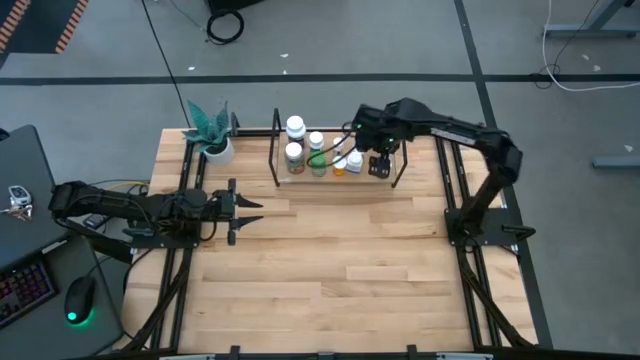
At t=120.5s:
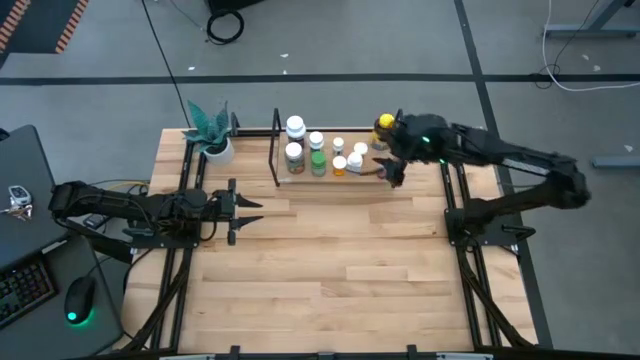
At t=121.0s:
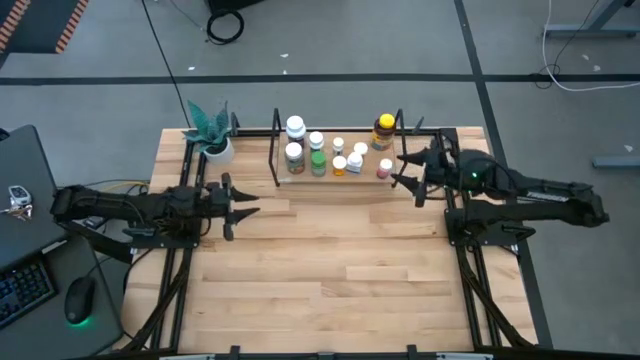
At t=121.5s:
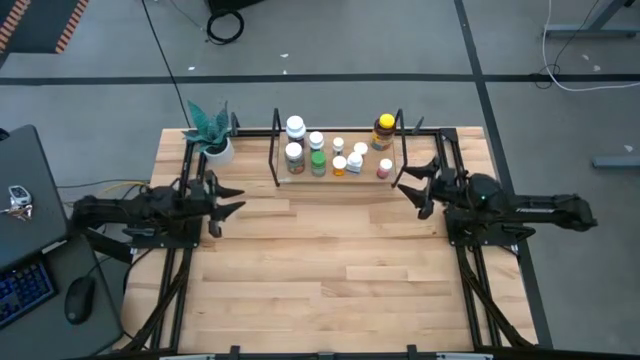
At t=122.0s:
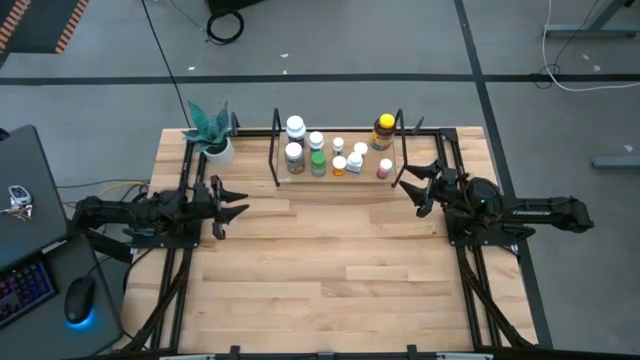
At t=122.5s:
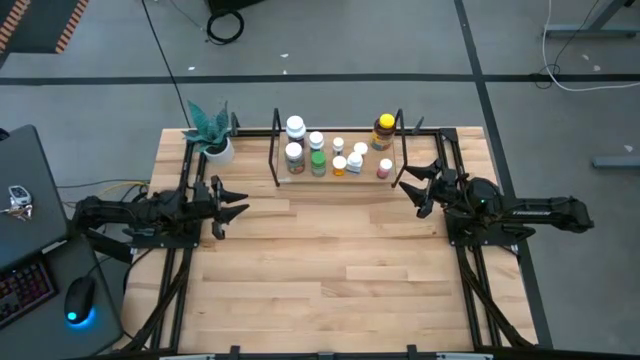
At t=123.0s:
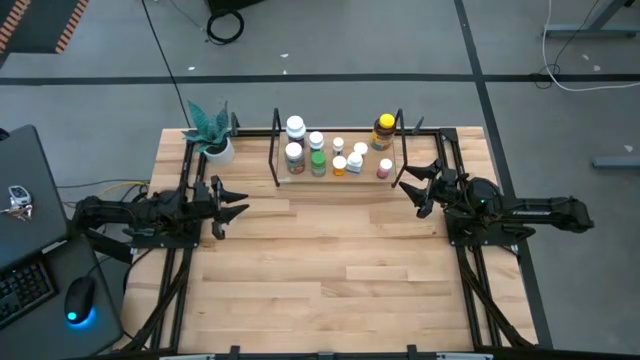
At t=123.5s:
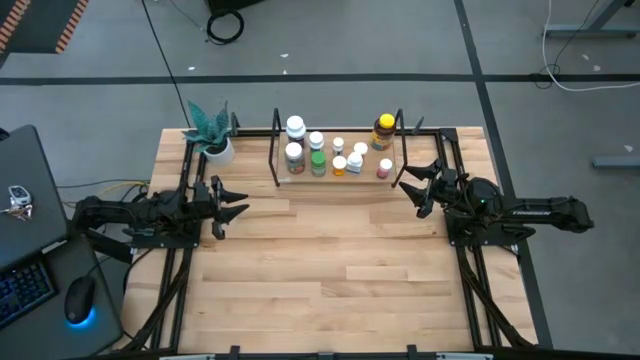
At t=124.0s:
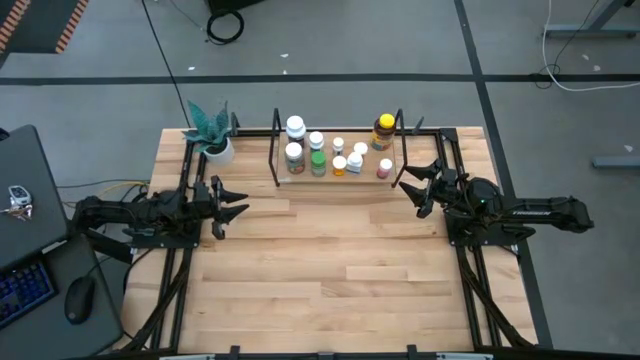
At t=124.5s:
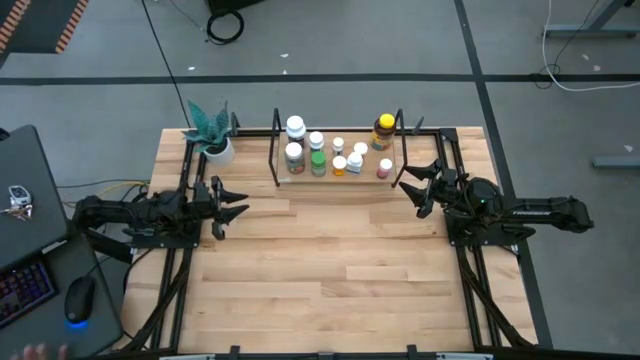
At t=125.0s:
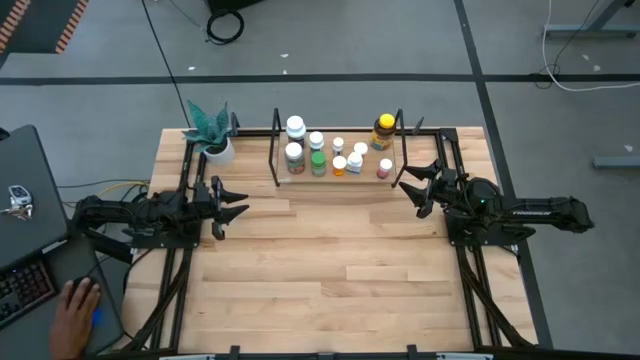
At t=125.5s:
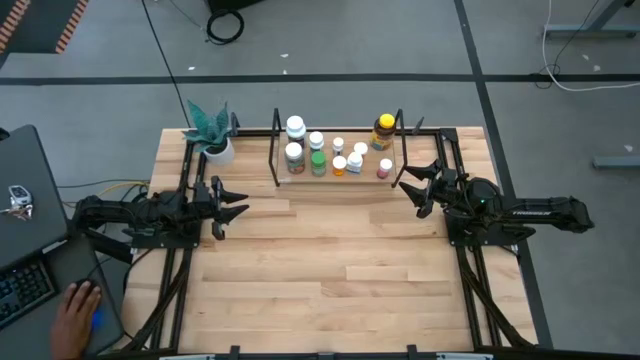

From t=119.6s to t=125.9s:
Task: Pick and place medicine bottles onto shelf by color
Return to Home Position

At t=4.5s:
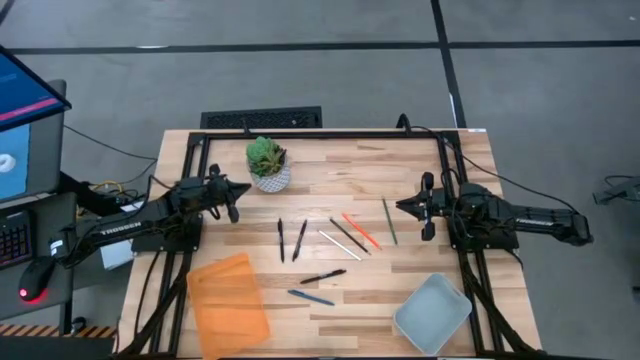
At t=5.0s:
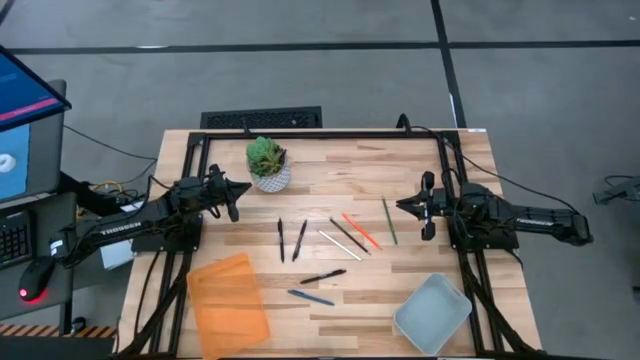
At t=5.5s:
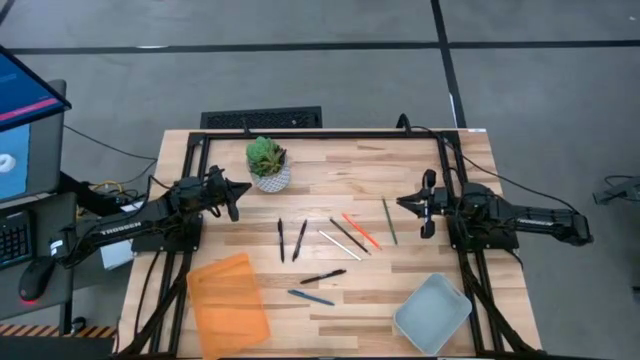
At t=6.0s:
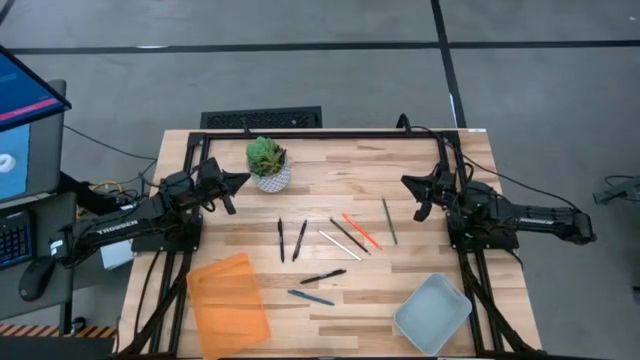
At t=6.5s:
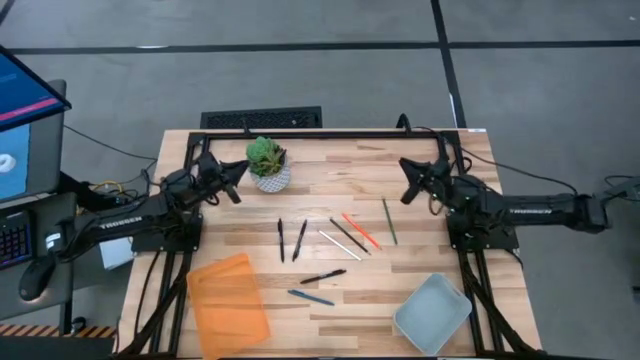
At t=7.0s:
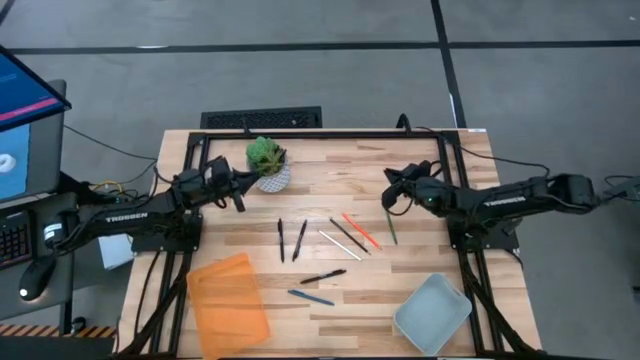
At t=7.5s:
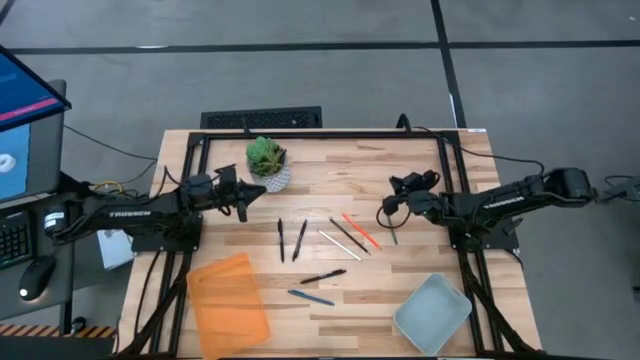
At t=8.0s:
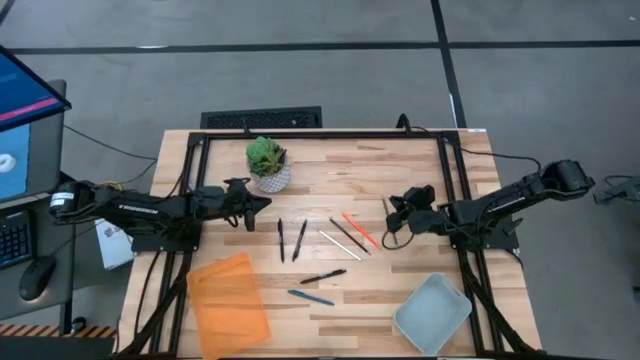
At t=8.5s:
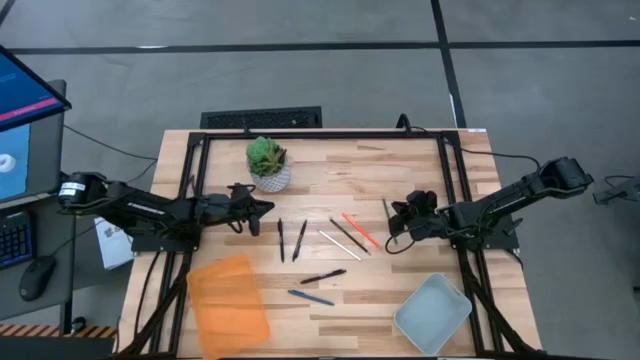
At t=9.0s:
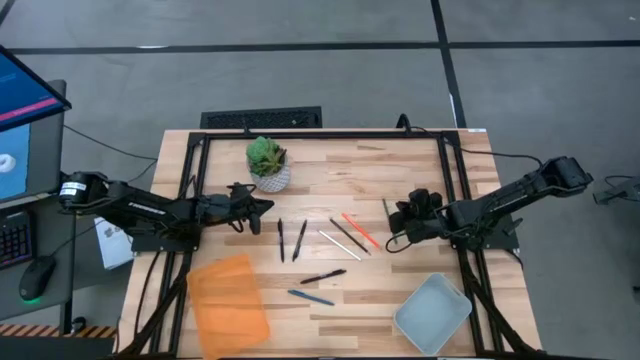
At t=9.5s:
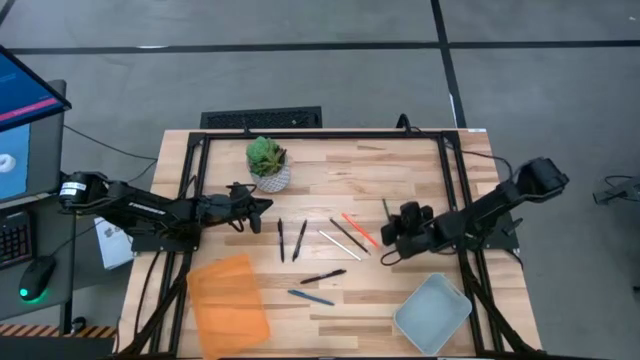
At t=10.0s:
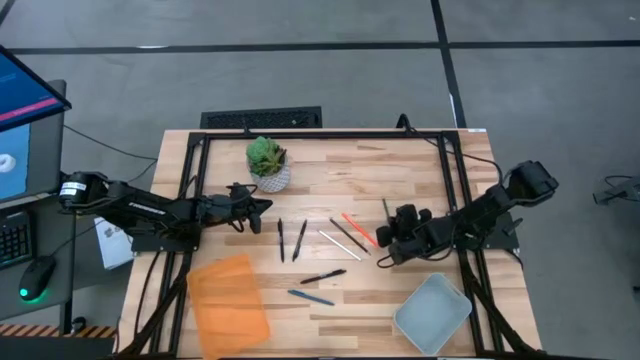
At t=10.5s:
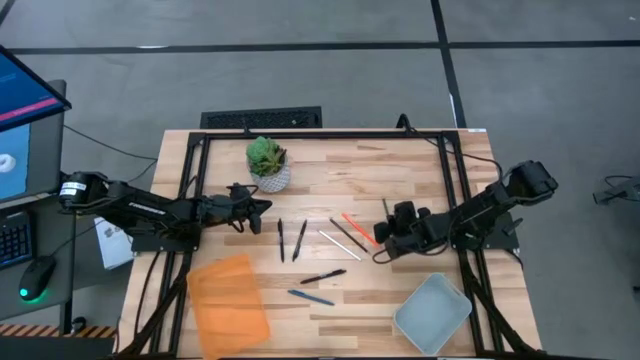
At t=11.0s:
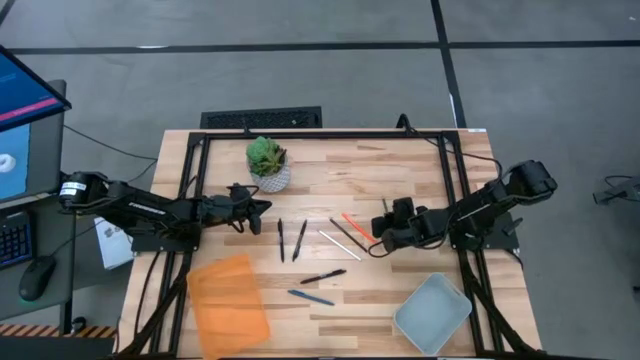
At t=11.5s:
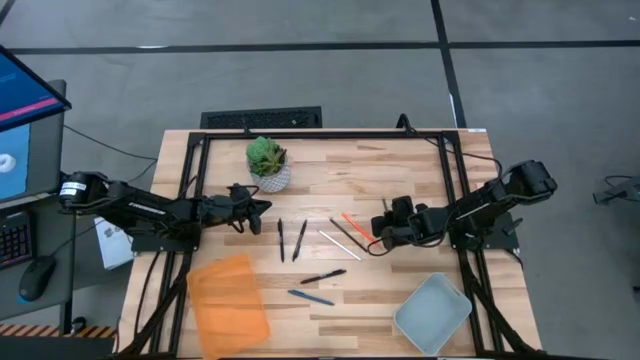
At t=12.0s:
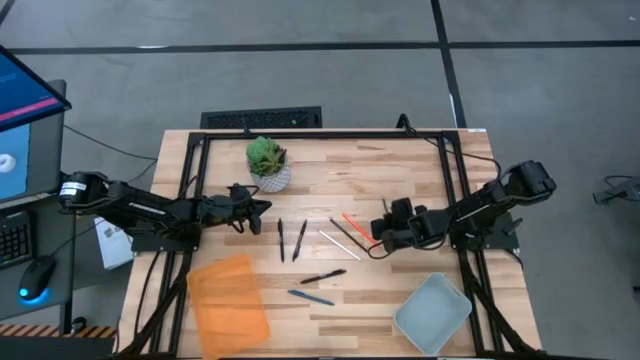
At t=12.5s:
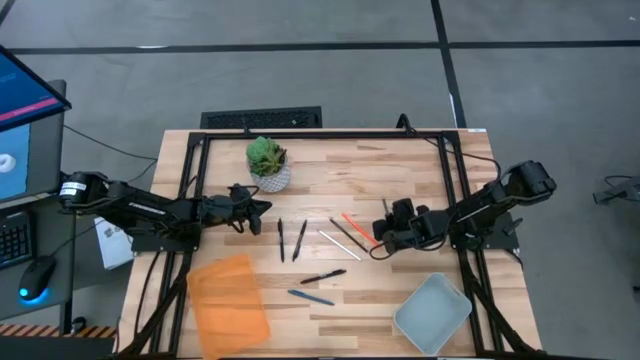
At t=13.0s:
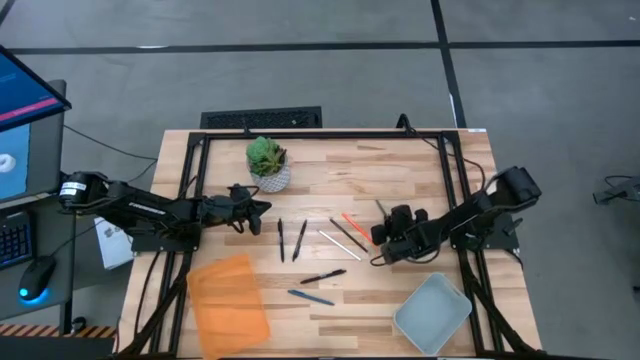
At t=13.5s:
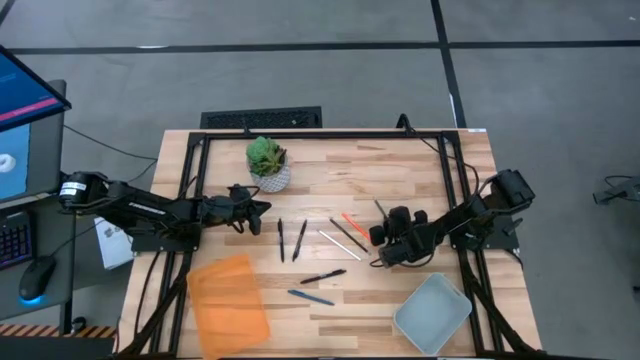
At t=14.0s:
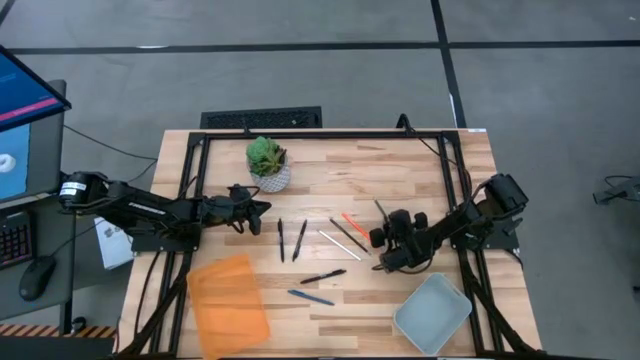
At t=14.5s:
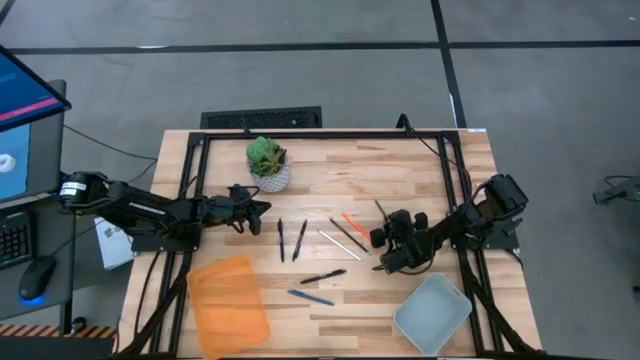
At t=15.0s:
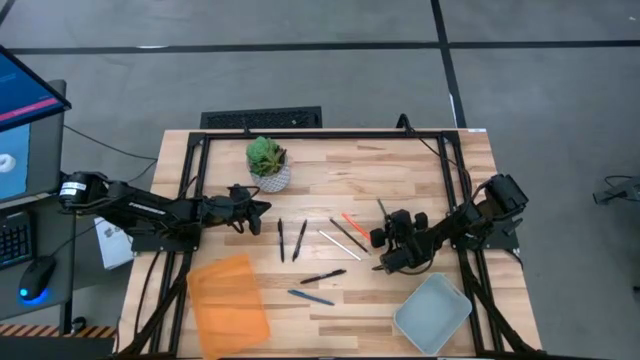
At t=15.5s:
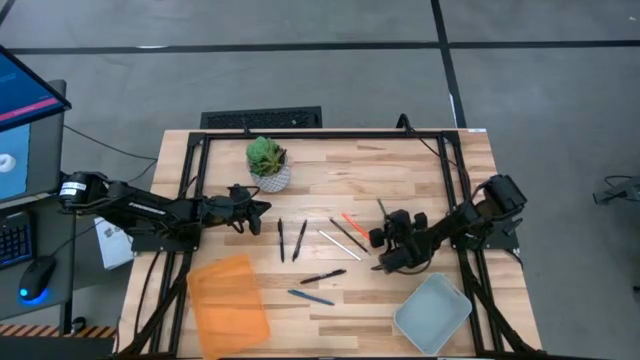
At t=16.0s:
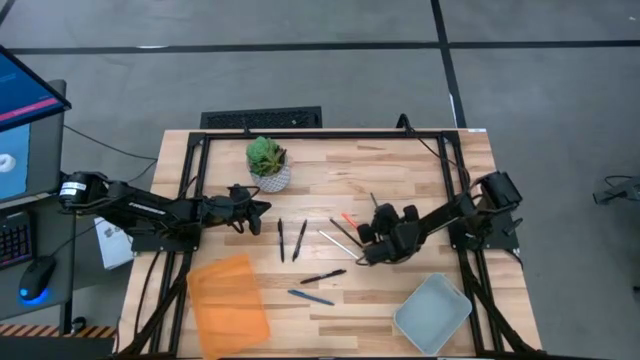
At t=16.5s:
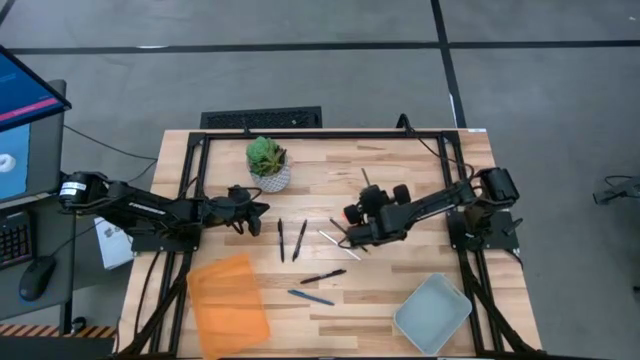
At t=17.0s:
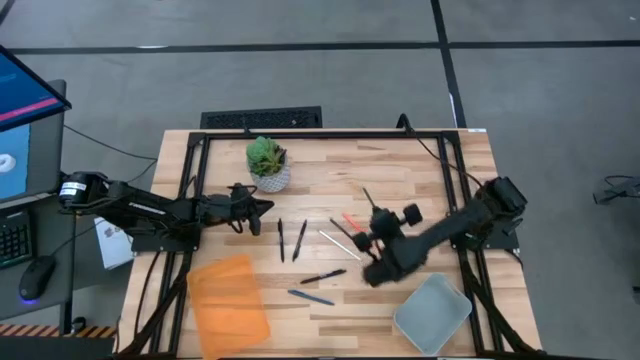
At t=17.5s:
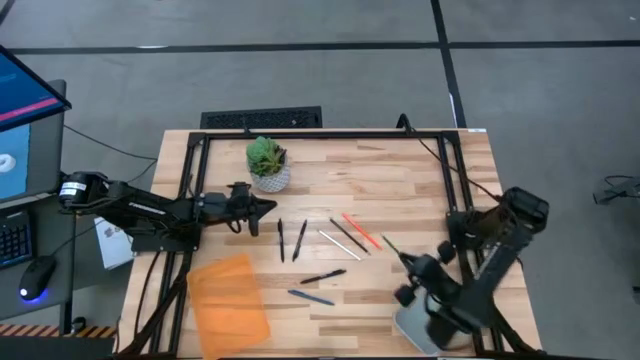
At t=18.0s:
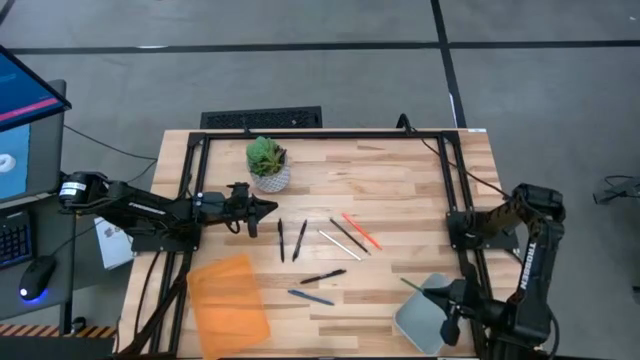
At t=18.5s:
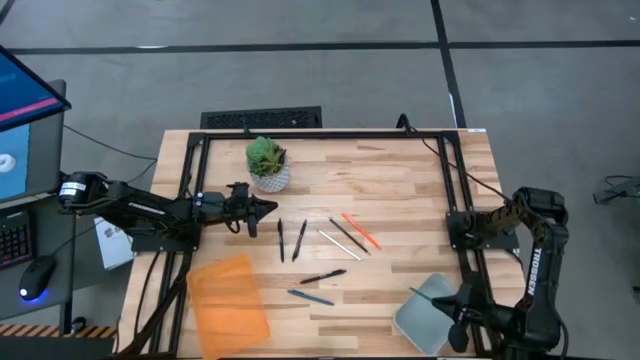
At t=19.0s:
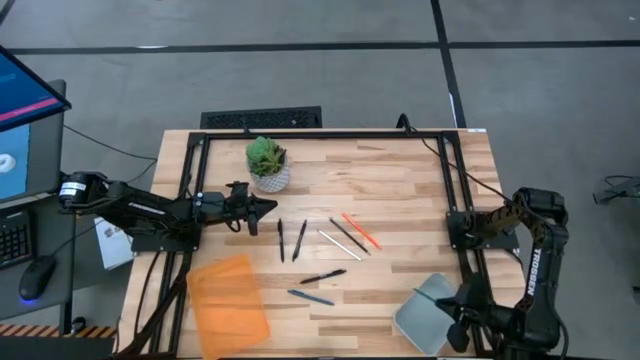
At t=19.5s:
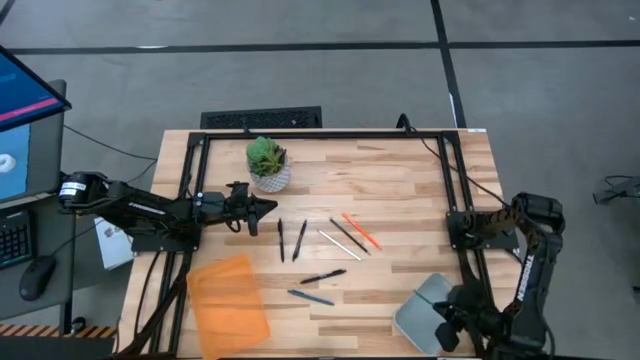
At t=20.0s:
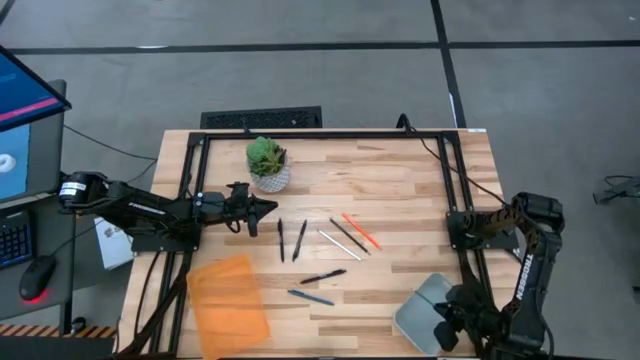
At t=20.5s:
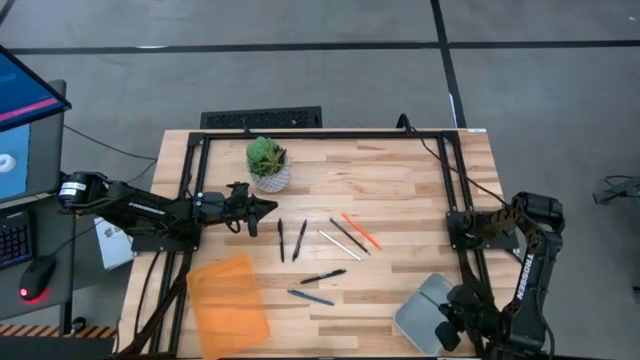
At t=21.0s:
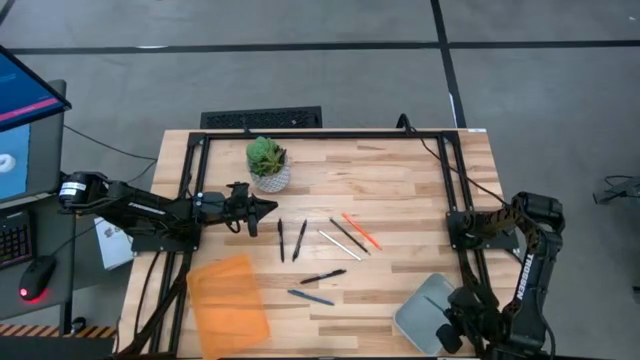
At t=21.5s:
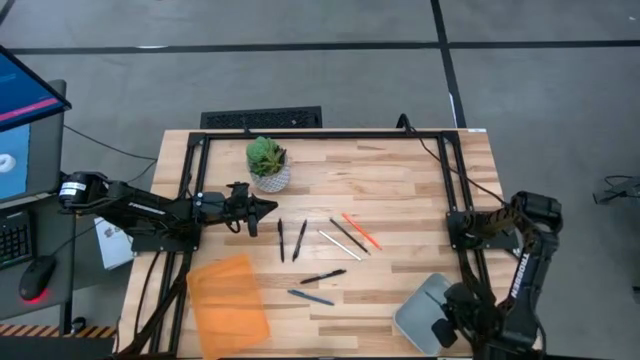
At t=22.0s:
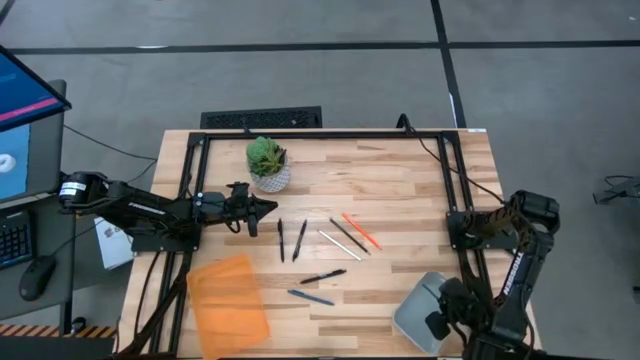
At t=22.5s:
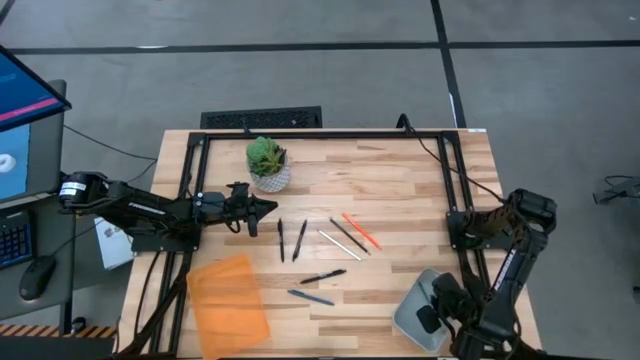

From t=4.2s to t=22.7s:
Task: Sort pens & pencils
Put the green pencil into the gray bin
